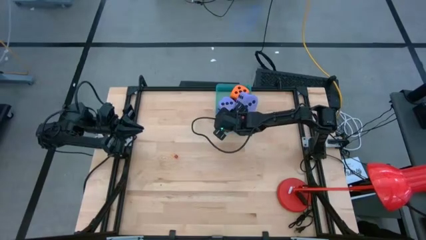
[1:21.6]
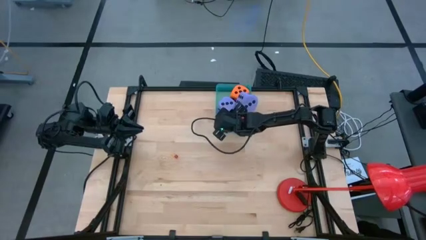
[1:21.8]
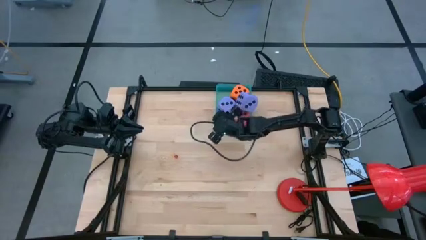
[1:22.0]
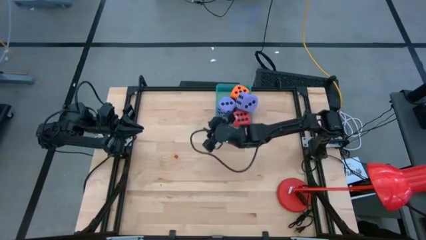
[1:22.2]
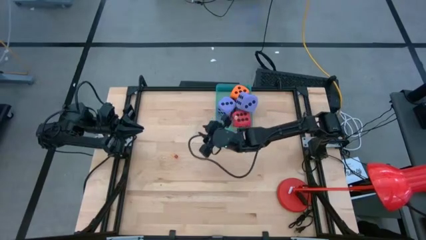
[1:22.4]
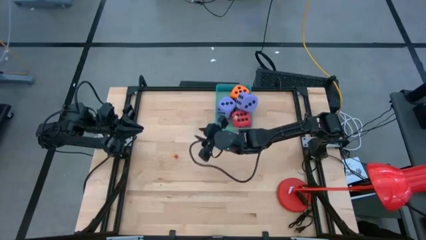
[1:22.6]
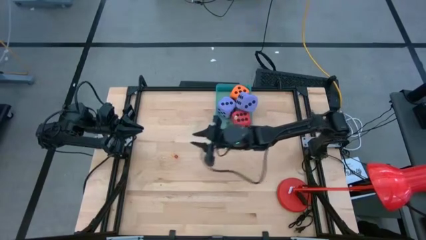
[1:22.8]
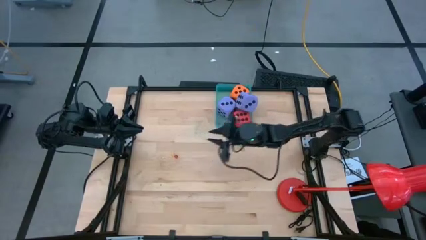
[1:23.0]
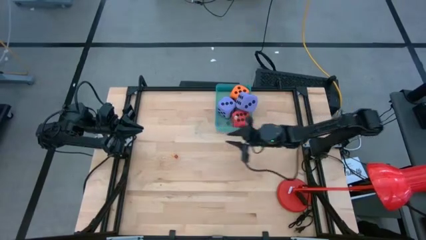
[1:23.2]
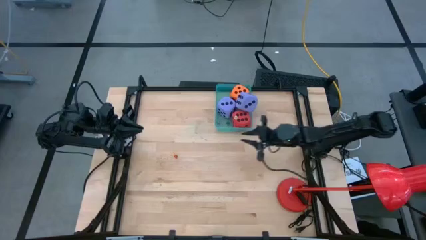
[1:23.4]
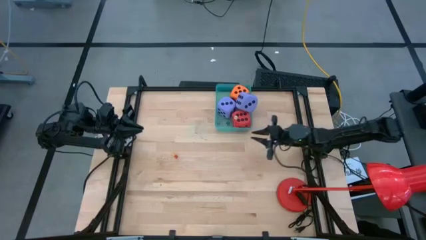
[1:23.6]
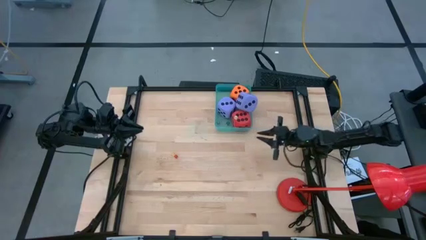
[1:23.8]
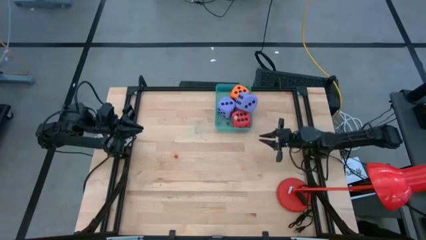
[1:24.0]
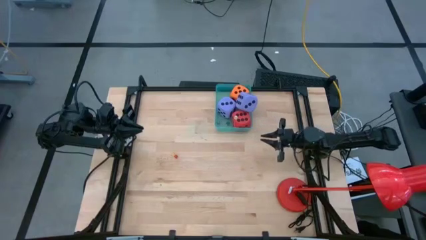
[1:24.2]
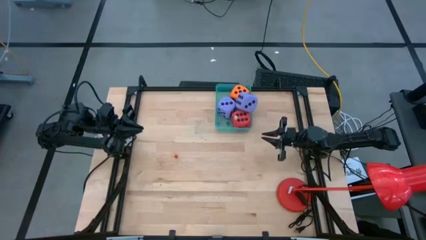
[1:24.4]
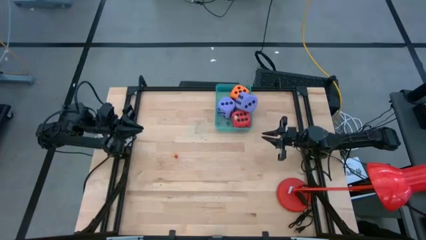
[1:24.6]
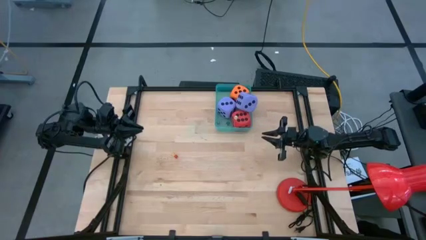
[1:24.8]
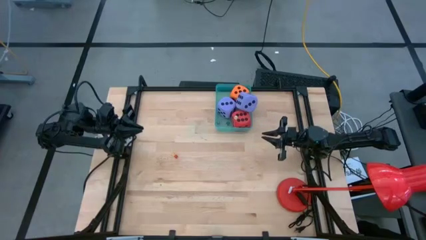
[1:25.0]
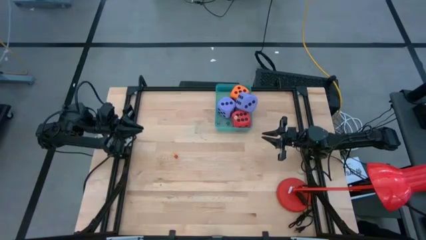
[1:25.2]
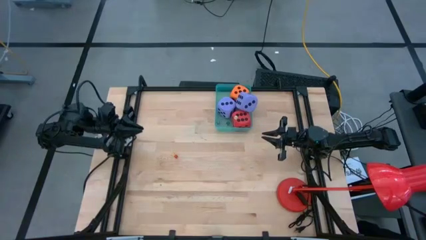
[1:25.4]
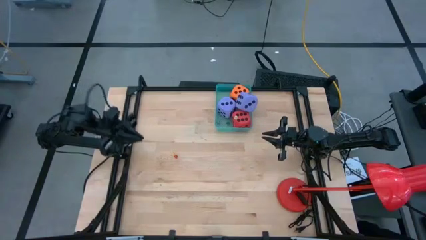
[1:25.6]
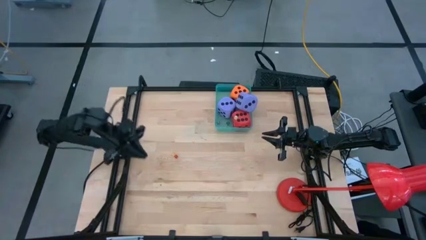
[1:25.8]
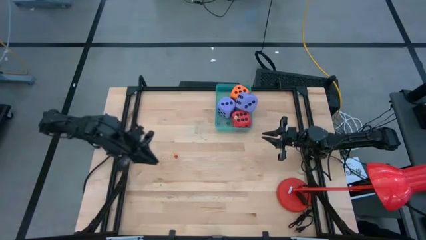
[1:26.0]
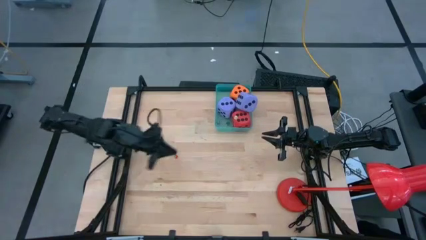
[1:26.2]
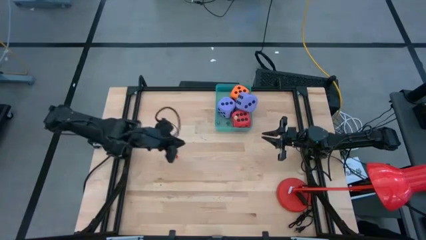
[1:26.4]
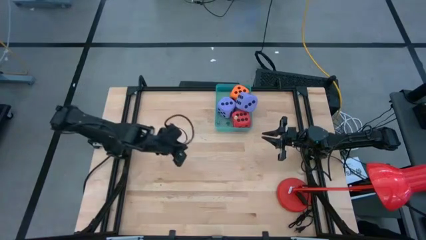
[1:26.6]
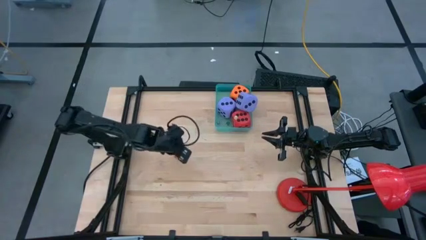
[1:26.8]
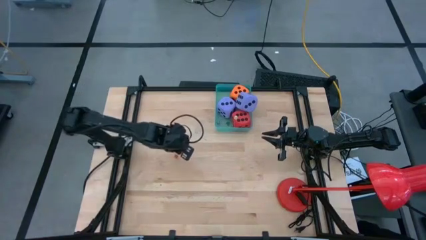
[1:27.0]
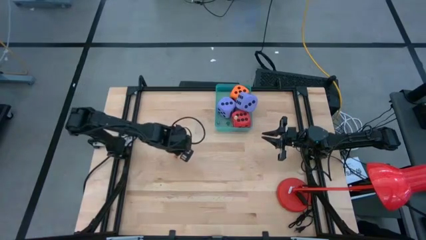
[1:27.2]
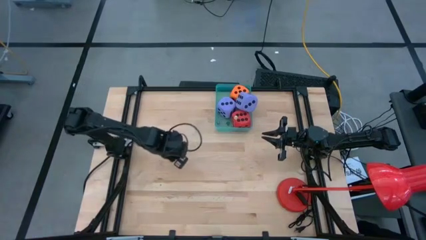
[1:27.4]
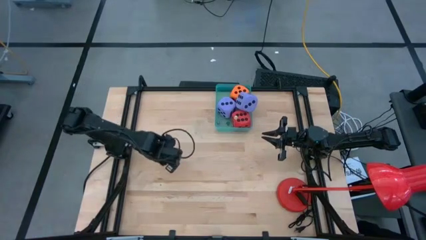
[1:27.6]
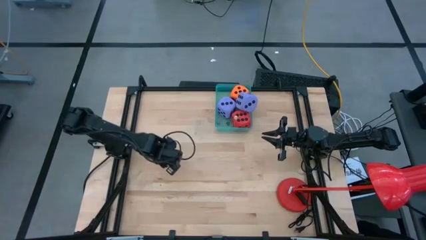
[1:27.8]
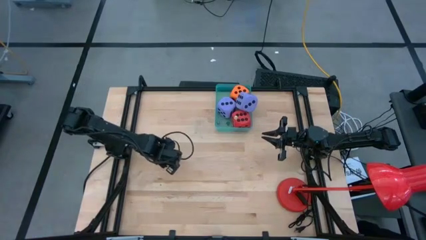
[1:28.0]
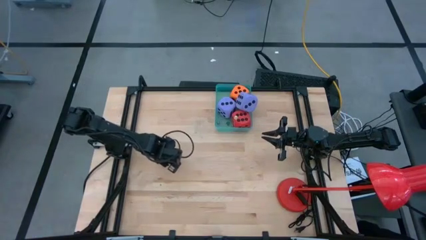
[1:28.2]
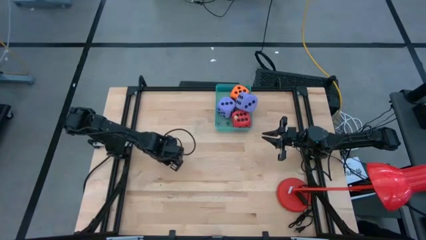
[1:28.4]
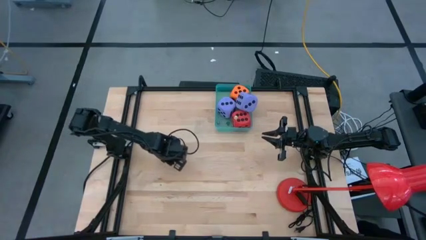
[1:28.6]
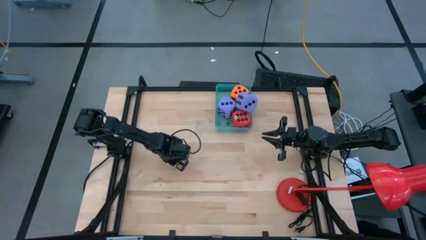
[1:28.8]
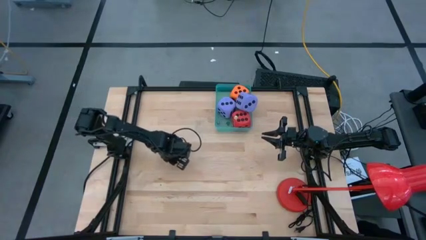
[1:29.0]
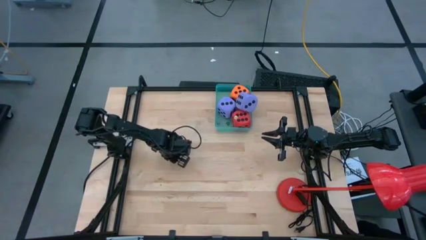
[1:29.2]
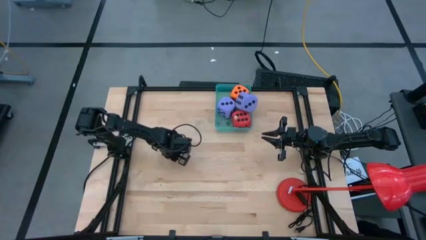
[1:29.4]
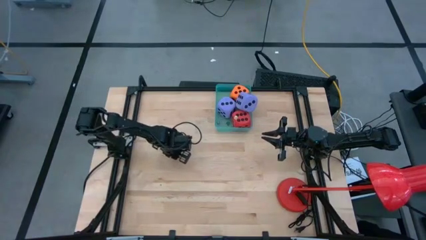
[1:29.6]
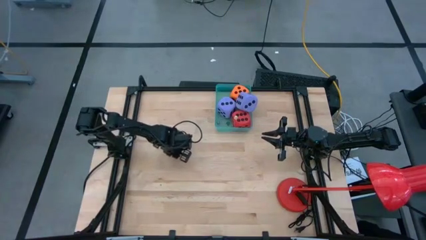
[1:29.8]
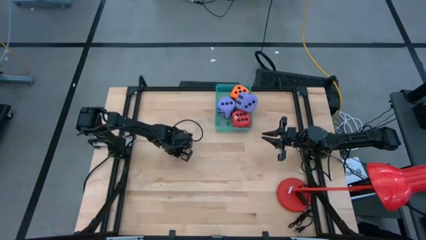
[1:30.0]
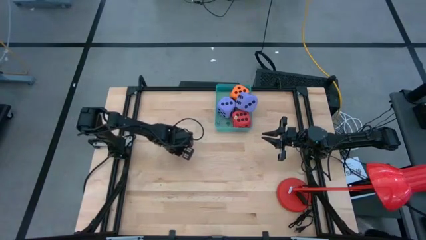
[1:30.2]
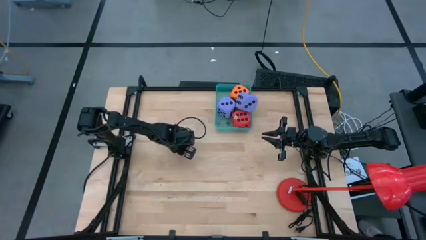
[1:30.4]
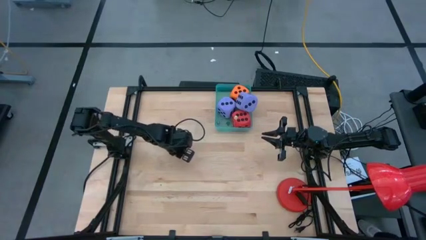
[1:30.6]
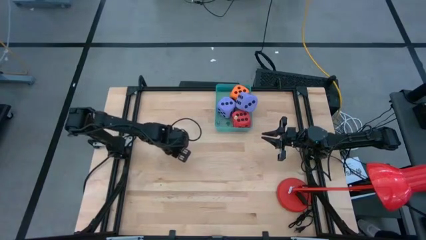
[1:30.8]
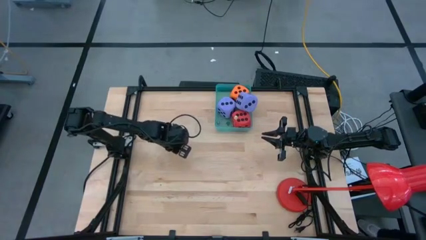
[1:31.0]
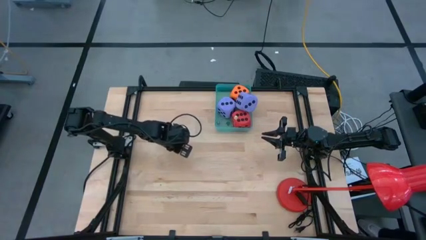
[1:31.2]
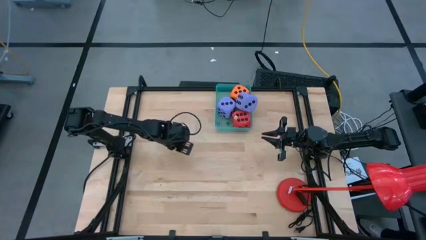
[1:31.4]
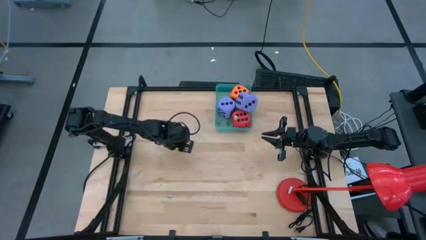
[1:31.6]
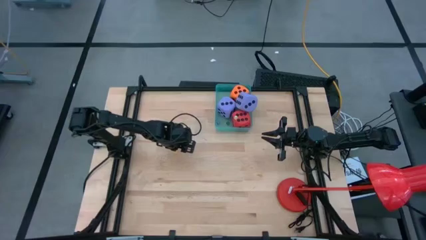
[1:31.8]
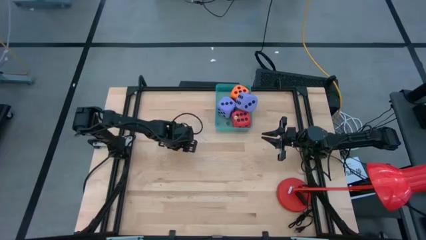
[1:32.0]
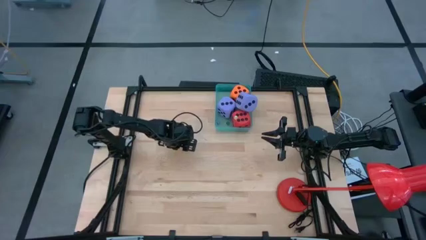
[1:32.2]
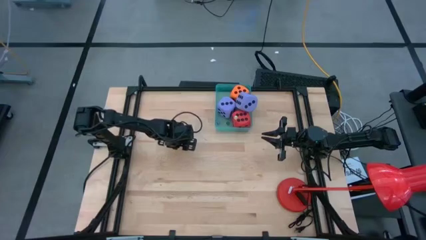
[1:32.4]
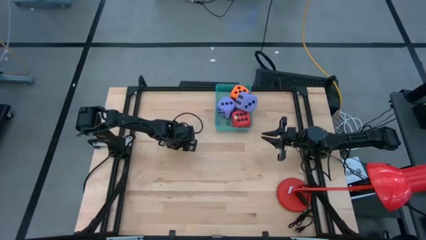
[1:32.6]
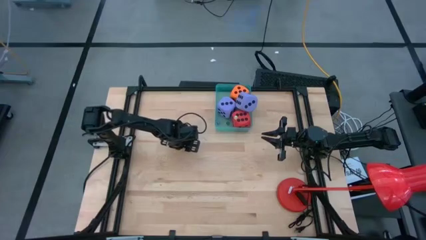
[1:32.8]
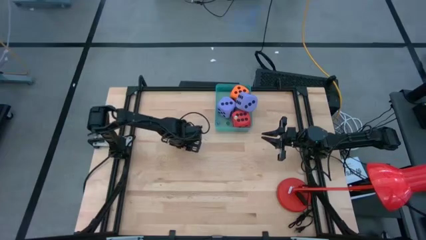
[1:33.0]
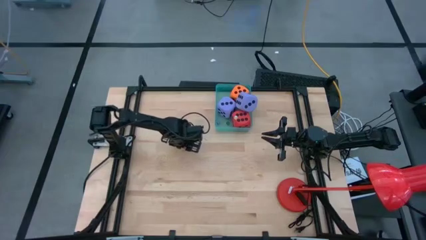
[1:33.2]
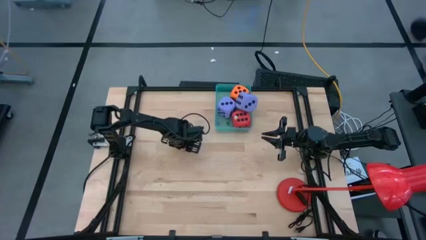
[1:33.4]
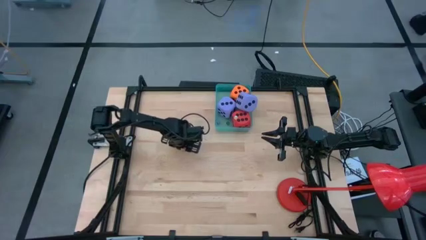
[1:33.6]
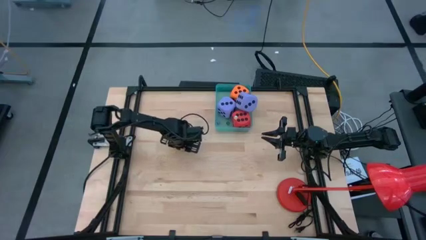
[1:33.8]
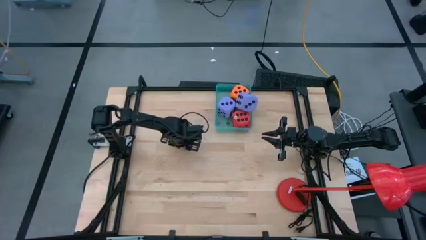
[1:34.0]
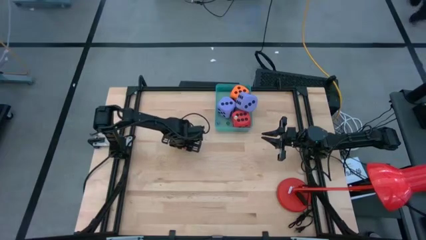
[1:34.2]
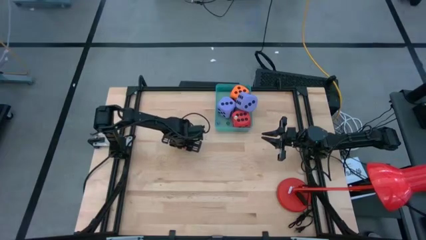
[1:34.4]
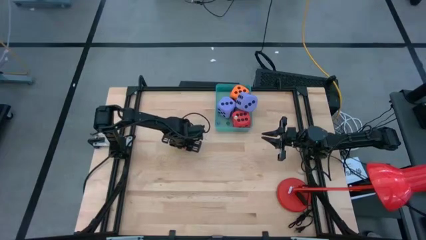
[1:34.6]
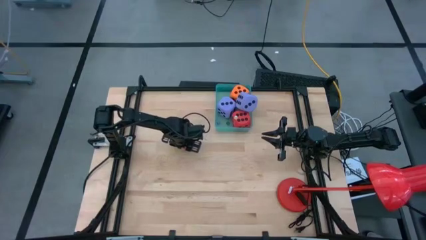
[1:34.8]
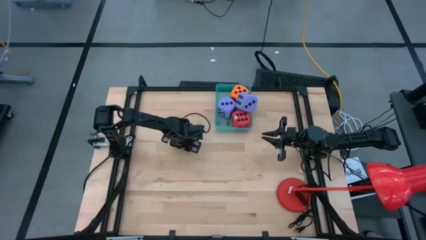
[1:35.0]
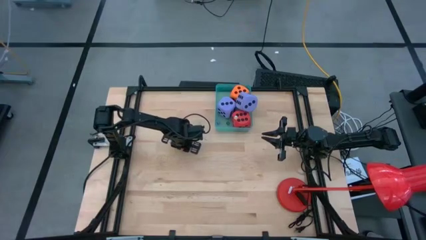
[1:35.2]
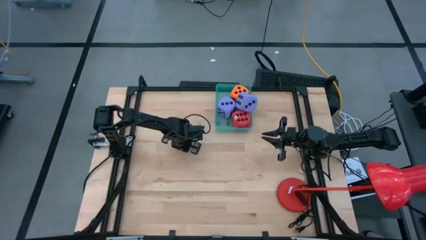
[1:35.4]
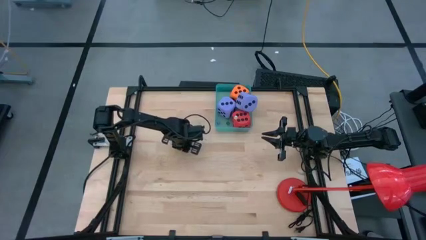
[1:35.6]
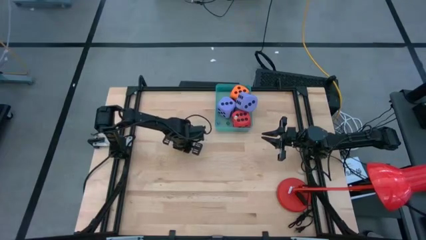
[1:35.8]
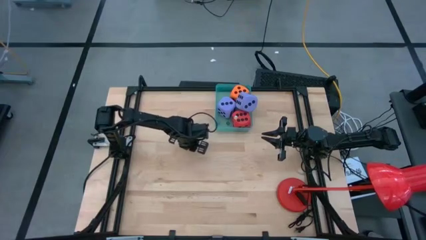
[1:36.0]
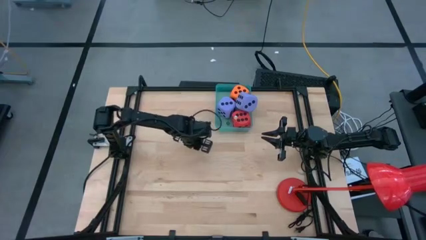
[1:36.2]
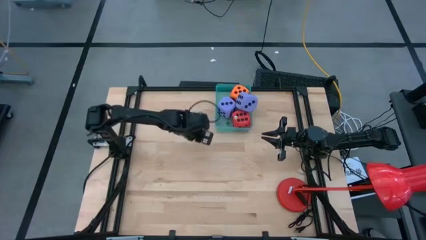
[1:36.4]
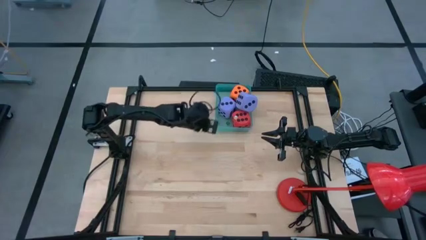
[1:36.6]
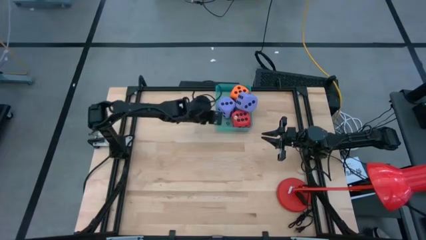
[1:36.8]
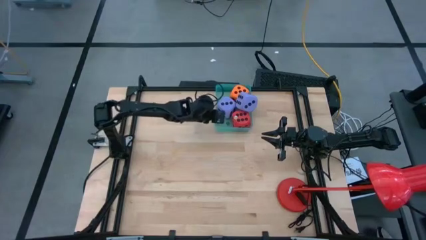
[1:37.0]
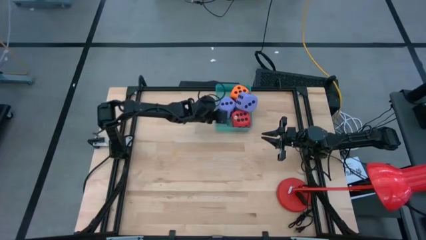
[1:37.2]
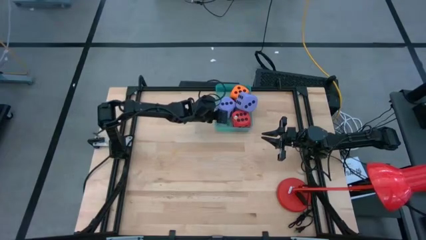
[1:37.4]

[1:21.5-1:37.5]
Task: Pick & Place Dice
Put the small red die into the green bin
